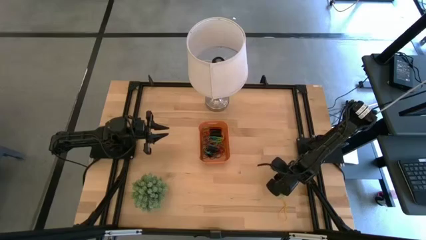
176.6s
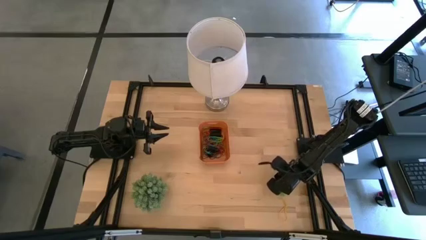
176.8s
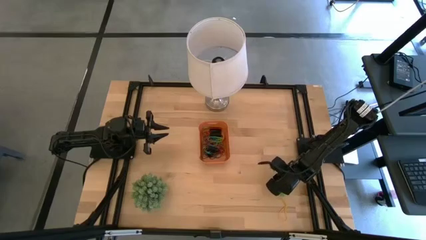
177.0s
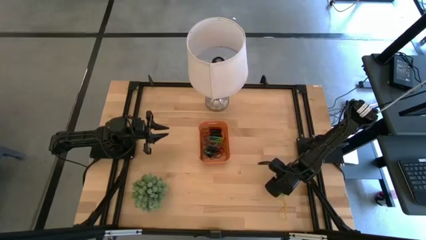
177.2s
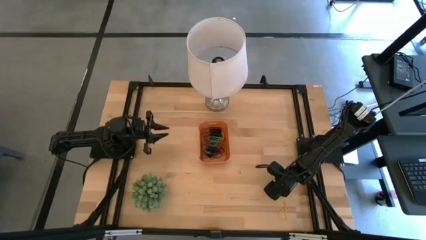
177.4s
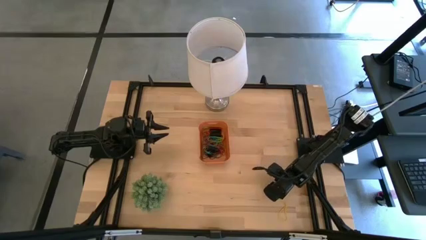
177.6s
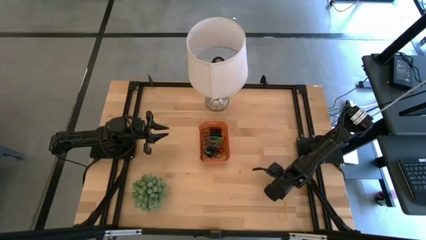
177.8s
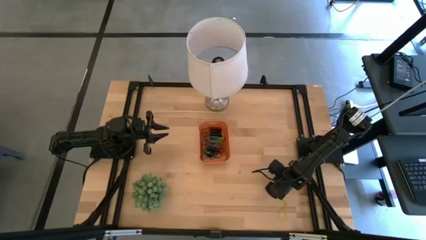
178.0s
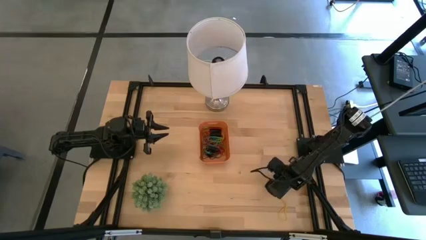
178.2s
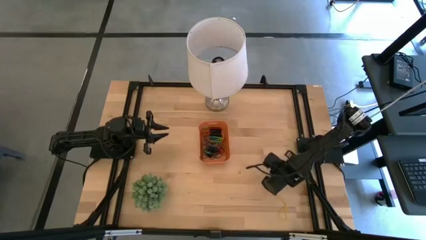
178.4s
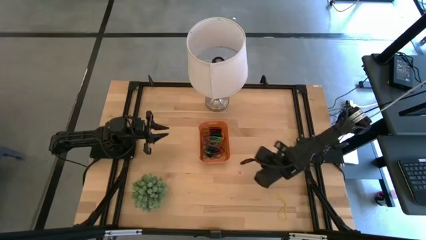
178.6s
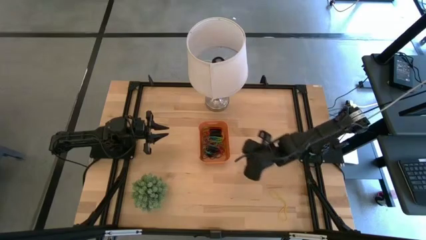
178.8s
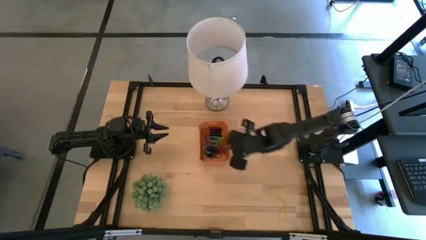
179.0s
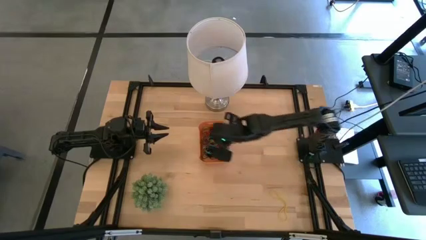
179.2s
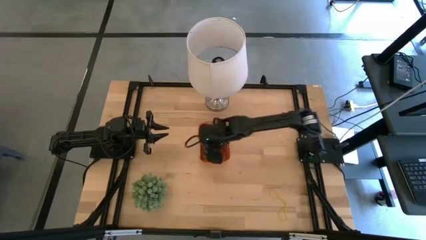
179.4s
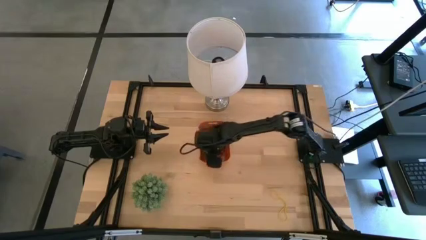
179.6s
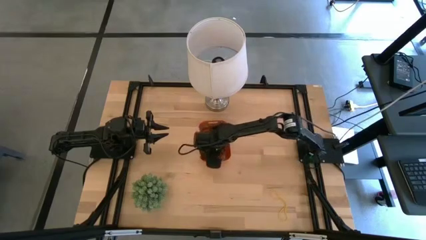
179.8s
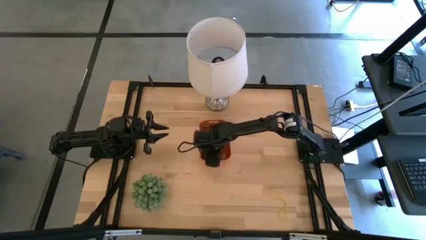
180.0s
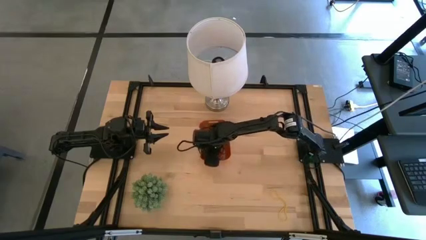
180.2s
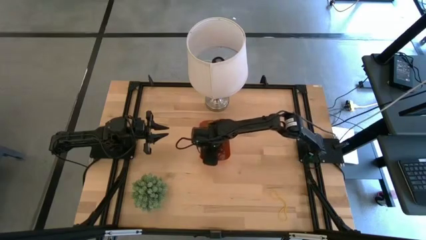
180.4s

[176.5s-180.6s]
Task: Pick and place rubber bands into bin
Put the green rubber band into the orange bin

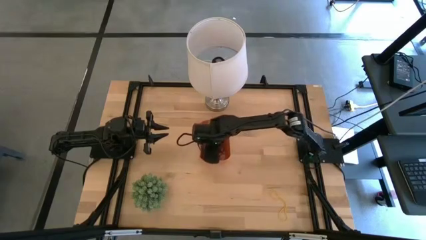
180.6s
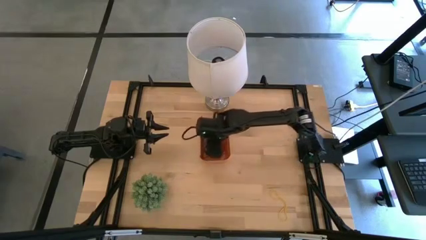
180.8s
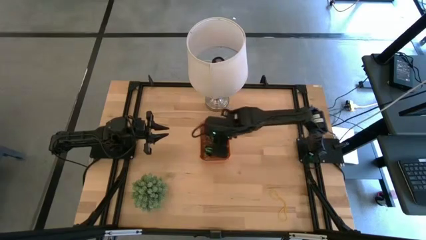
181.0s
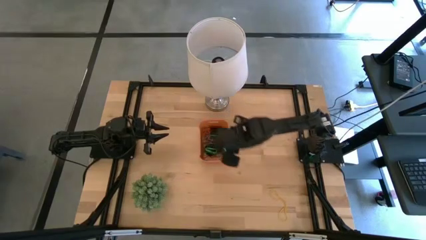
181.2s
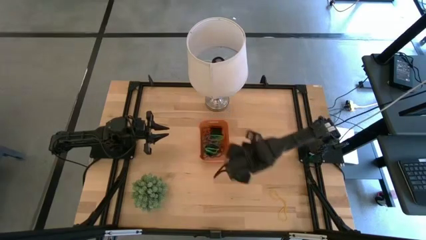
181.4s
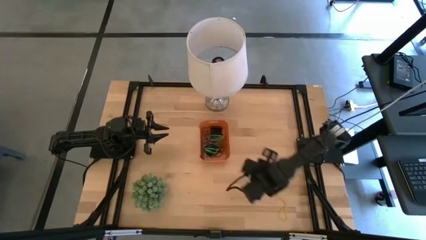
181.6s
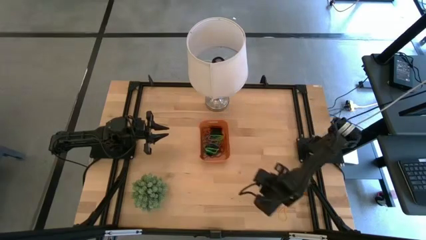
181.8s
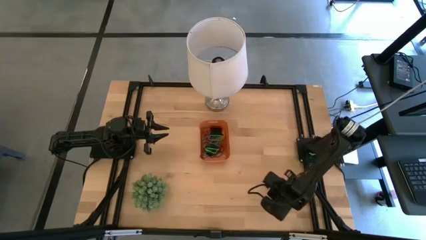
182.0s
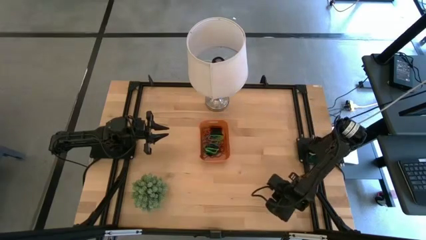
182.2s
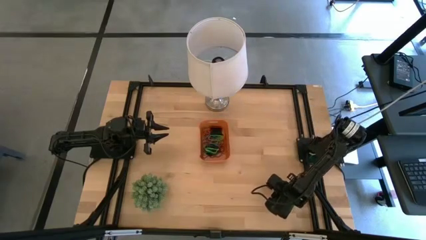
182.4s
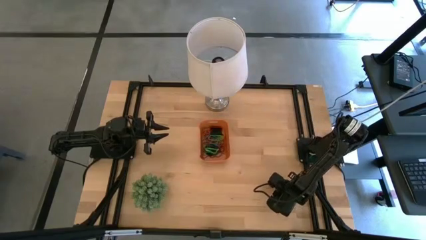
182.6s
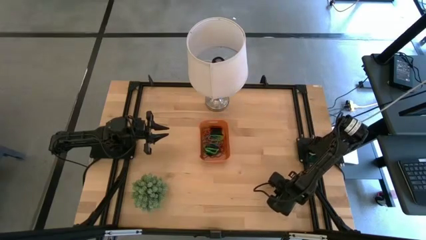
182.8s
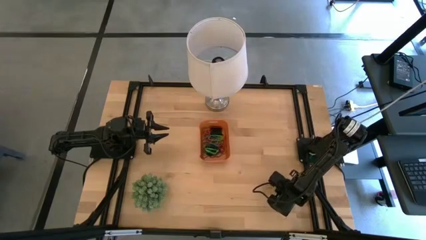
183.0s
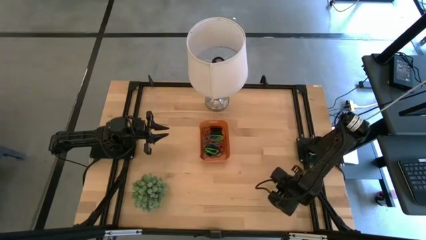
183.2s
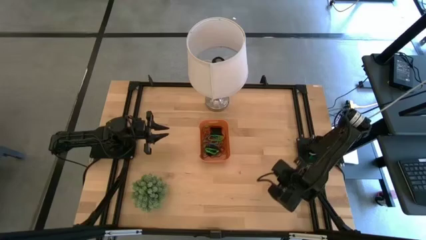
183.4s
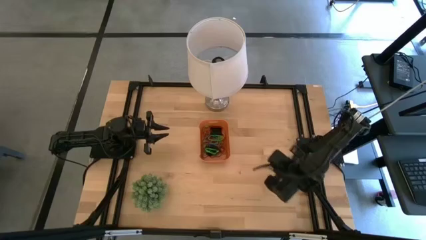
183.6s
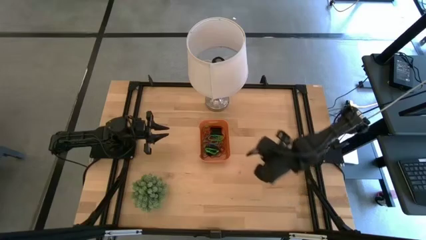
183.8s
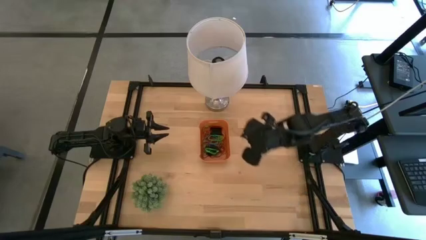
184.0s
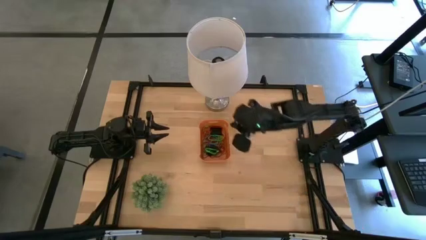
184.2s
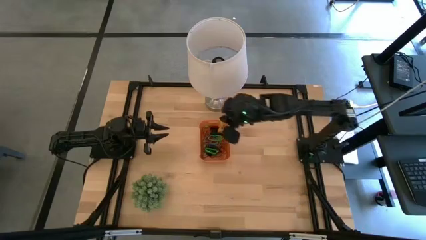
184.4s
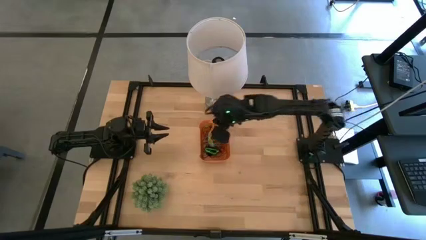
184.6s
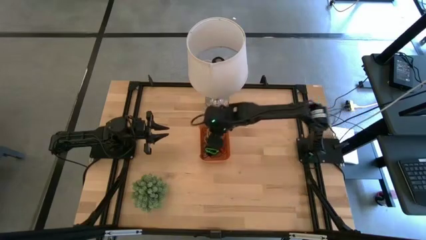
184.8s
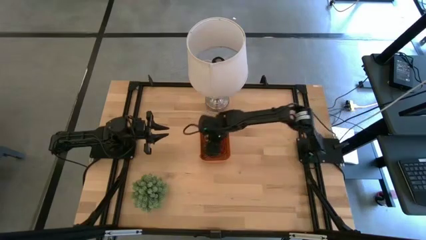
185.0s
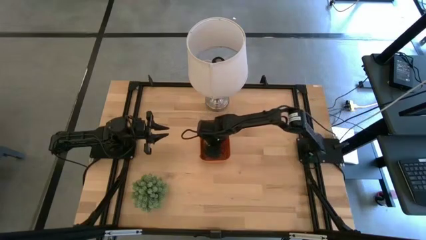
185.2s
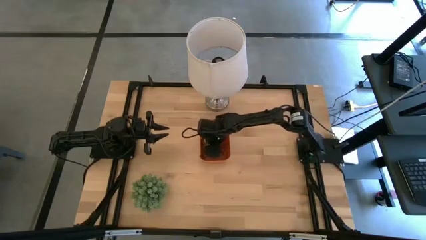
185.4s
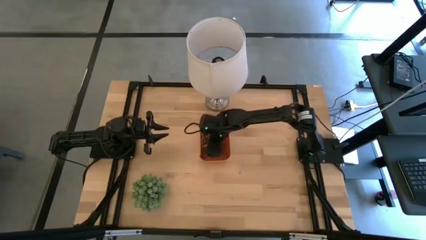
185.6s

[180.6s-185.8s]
Put the yellow rubber band into the orange bin

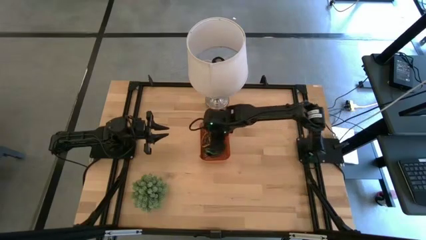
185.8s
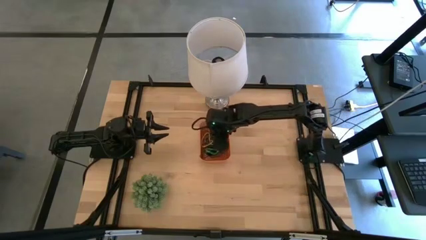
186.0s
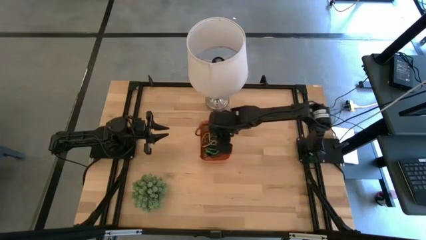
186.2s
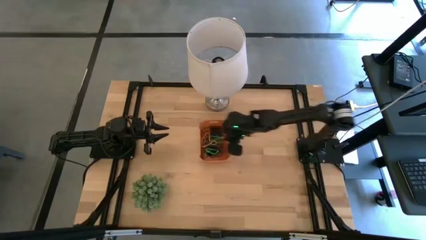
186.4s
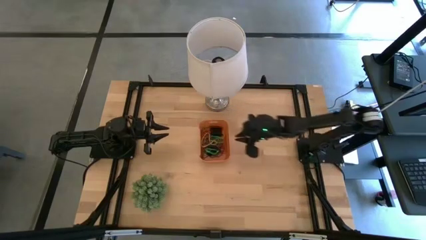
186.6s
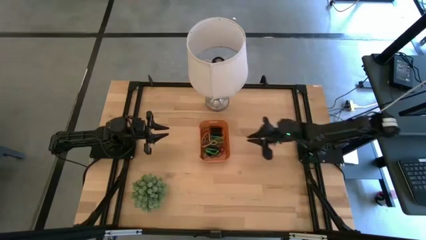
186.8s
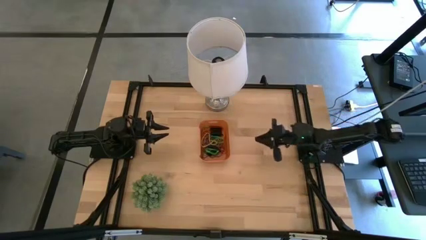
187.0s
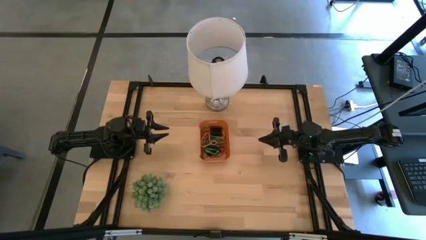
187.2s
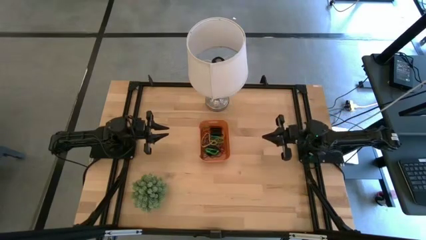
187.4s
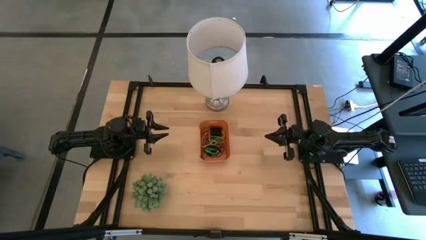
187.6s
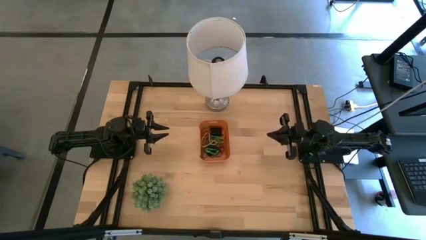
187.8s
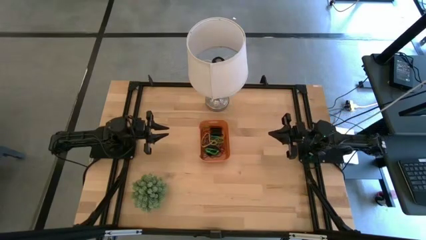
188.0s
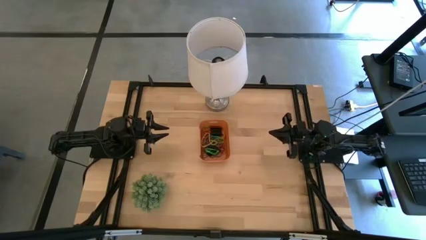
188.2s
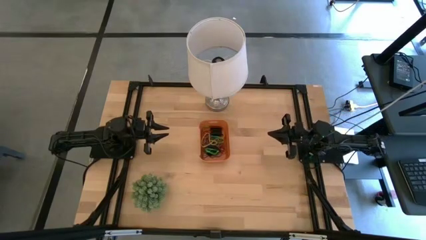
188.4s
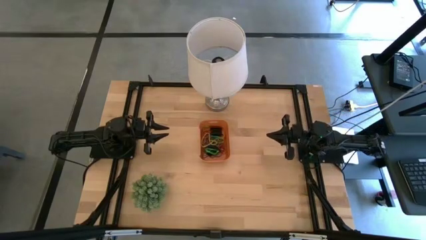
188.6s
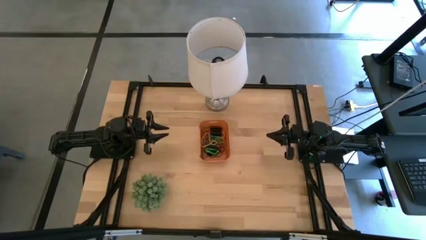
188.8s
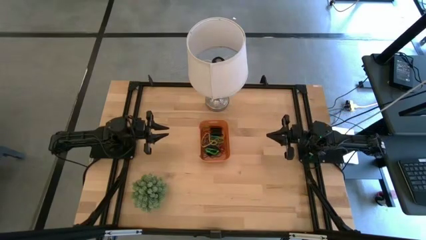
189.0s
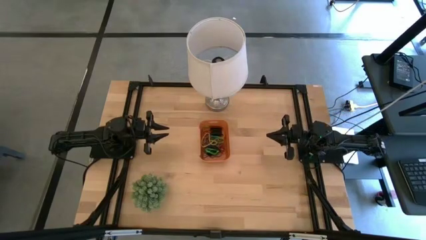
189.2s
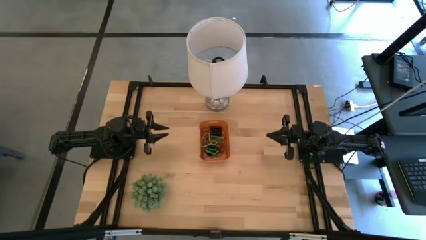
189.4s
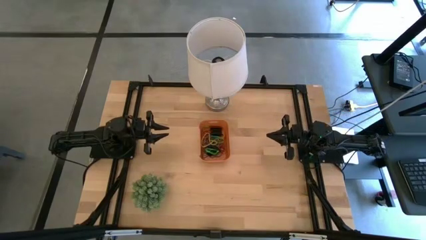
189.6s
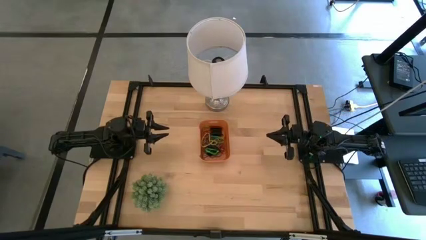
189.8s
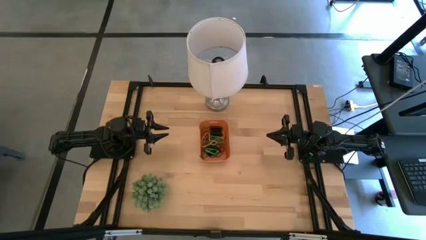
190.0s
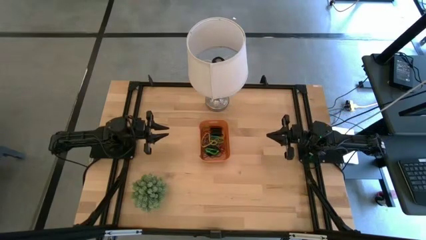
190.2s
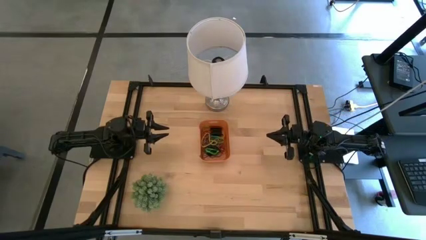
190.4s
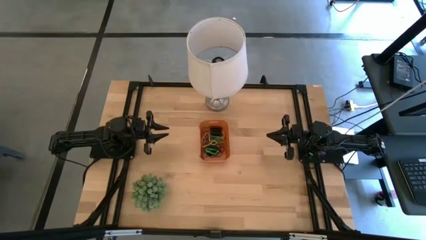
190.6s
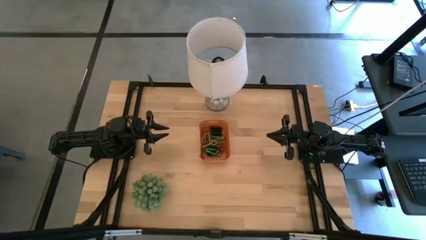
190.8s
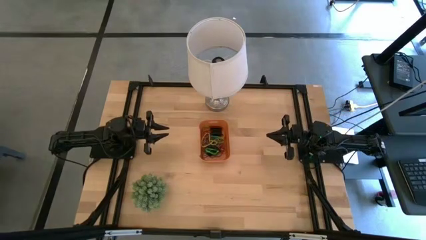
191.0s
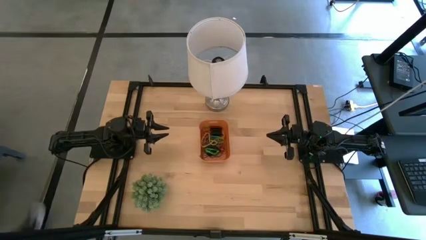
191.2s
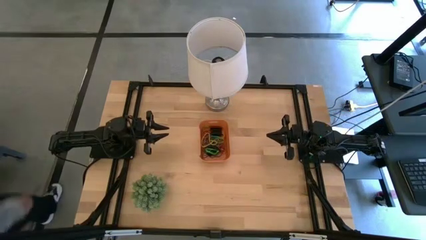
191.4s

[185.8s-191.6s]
Return to Home Position

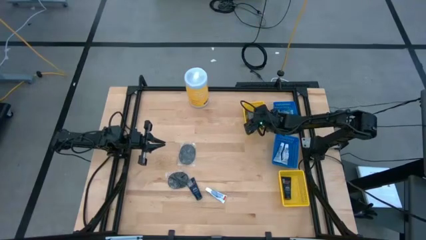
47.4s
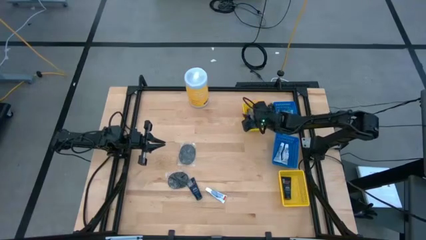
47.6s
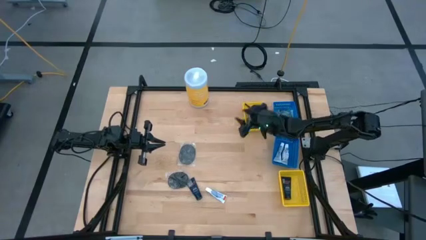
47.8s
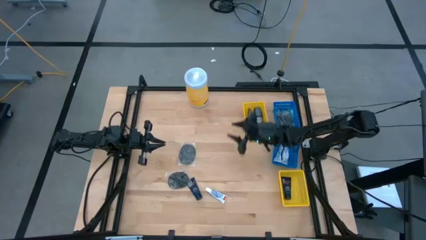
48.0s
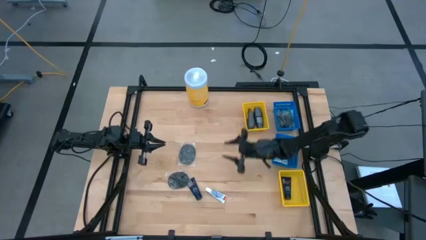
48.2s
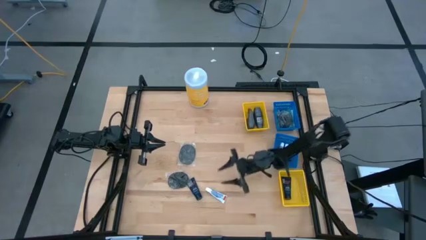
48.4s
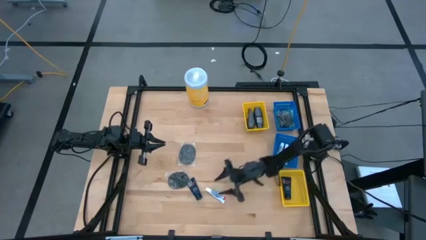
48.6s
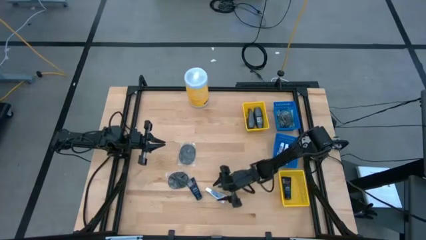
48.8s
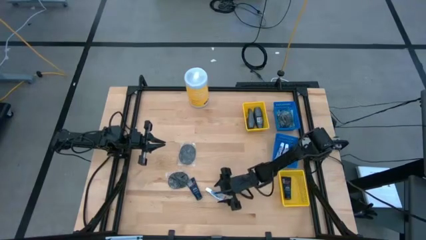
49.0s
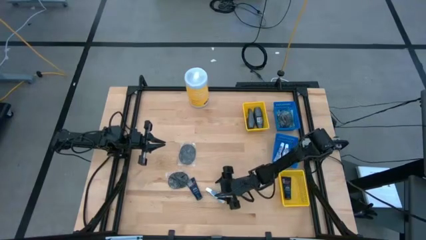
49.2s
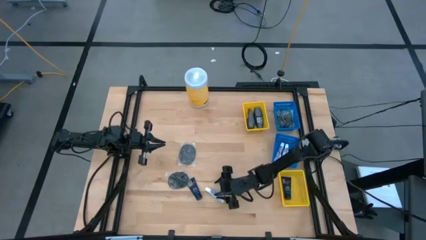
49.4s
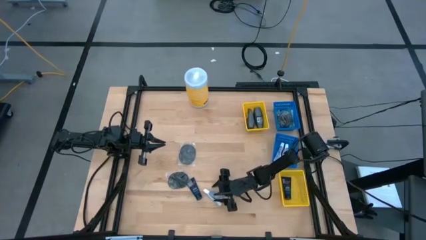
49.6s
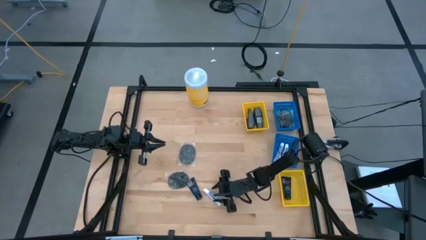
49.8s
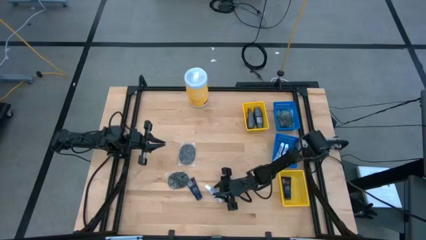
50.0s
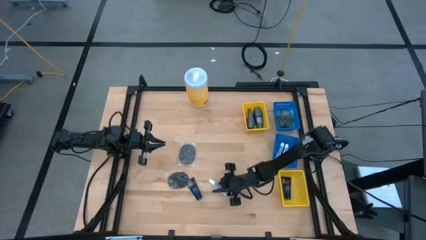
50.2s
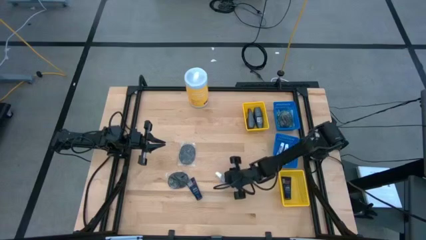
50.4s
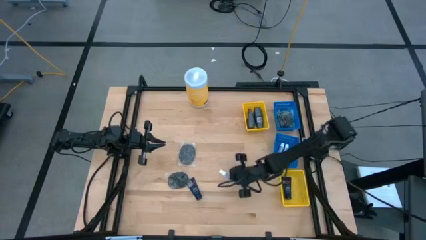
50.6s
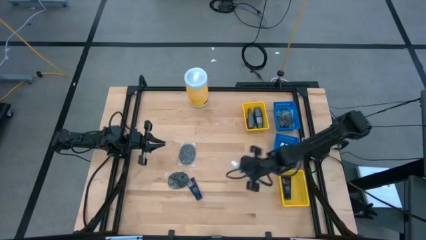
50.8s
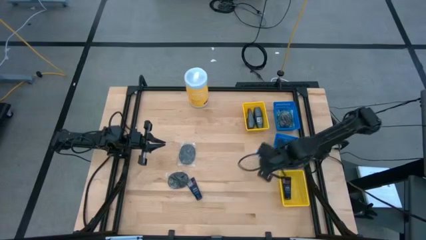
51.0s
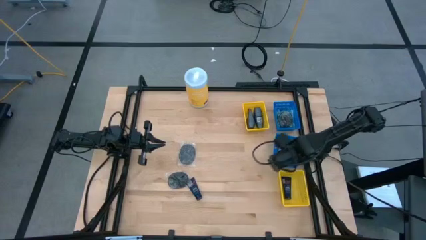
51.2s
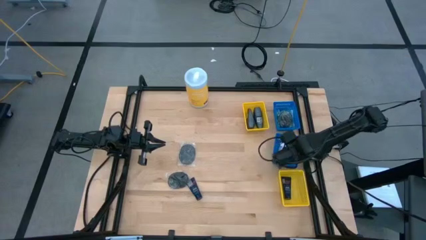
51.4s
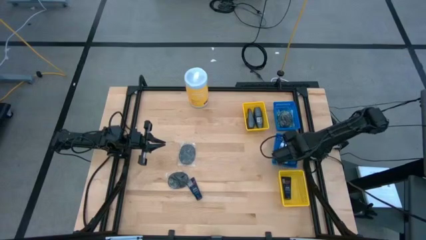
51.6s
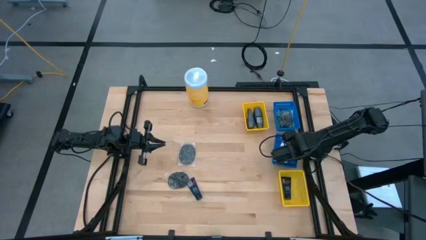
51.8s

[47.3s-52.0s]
Task: Pick & Place Travel size toiletries
Put the white toothpaste into the bottom blue basket
